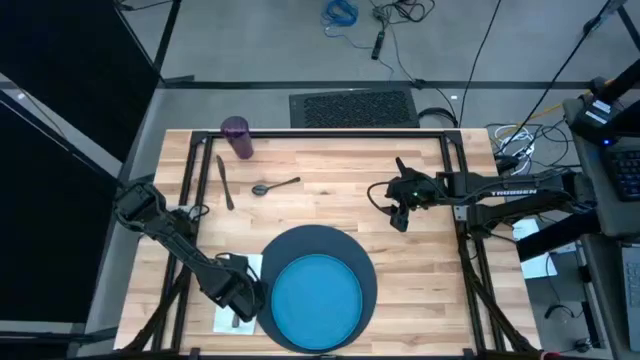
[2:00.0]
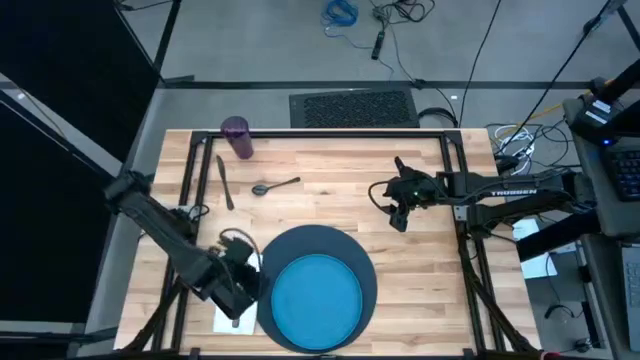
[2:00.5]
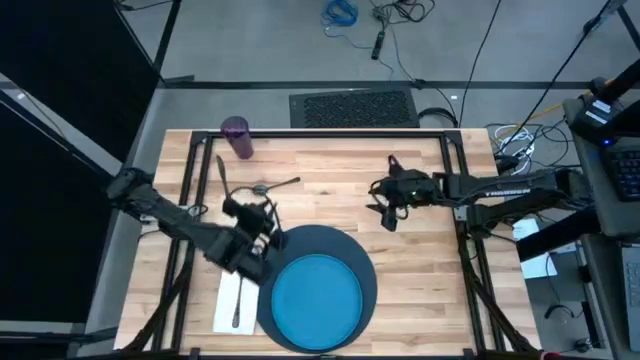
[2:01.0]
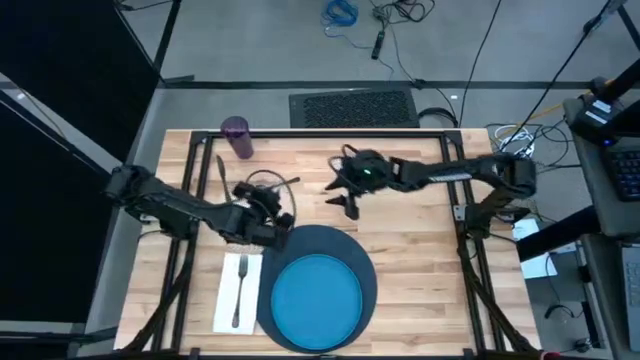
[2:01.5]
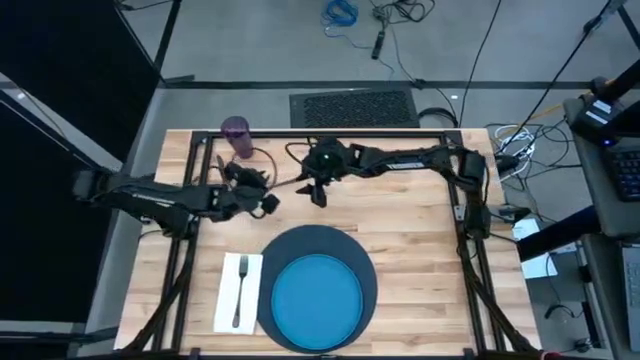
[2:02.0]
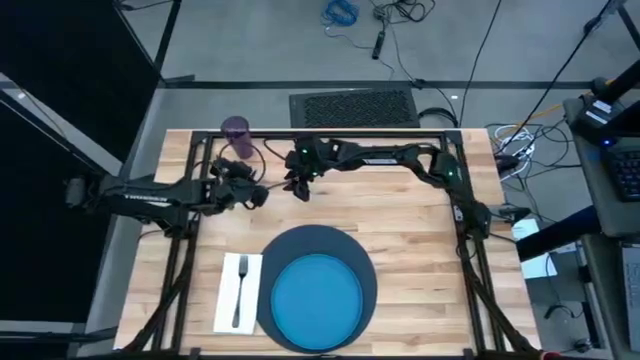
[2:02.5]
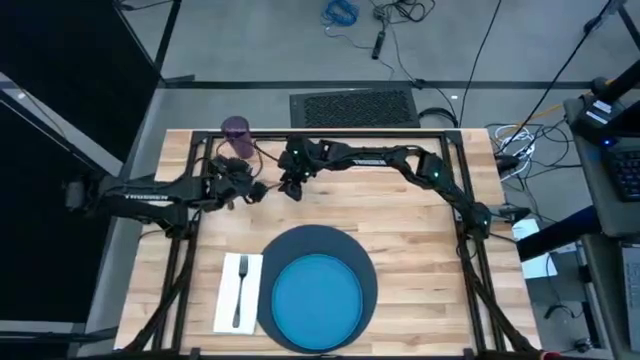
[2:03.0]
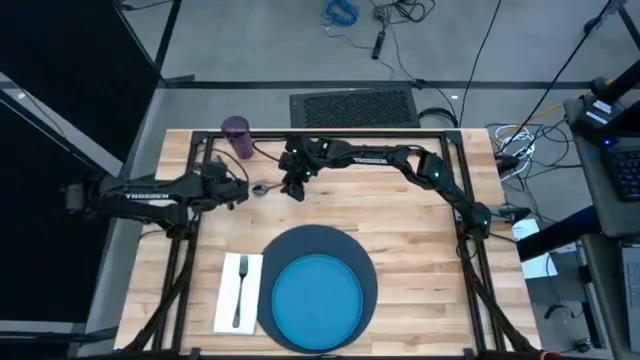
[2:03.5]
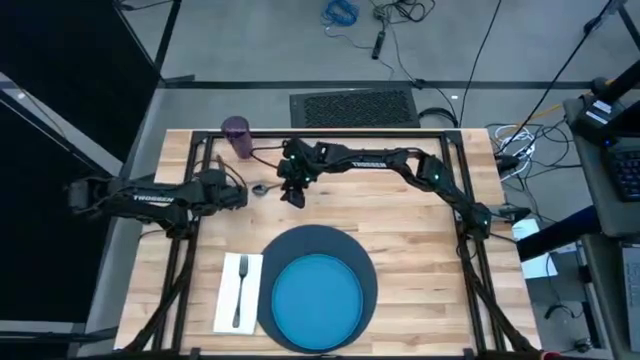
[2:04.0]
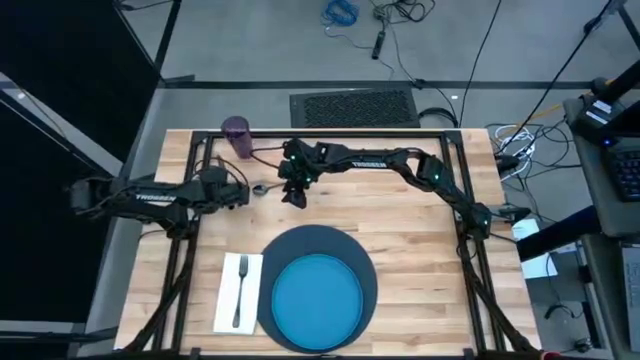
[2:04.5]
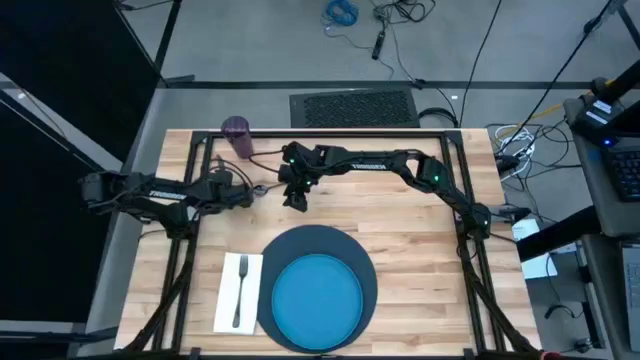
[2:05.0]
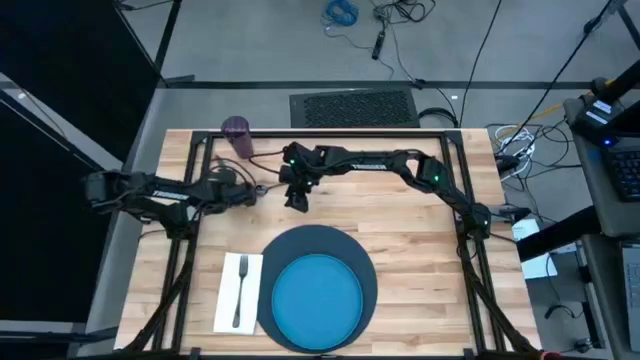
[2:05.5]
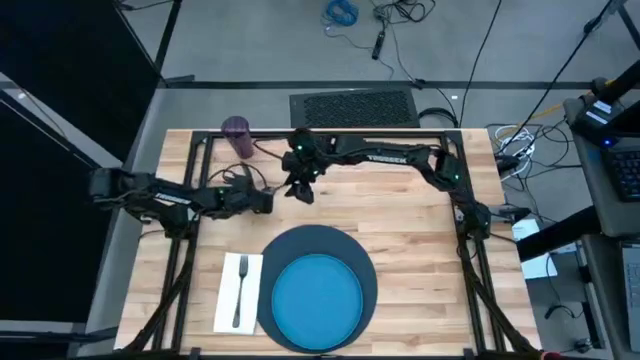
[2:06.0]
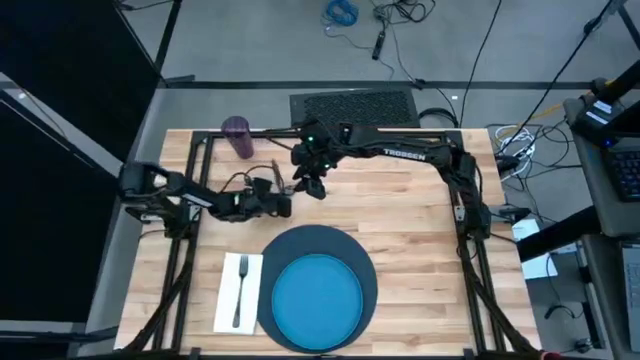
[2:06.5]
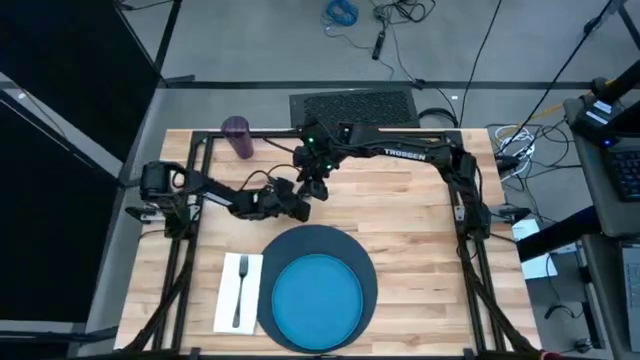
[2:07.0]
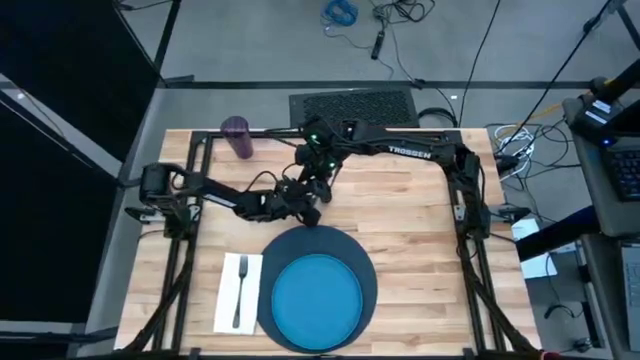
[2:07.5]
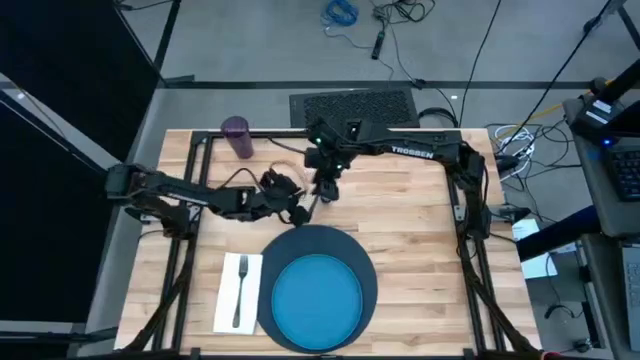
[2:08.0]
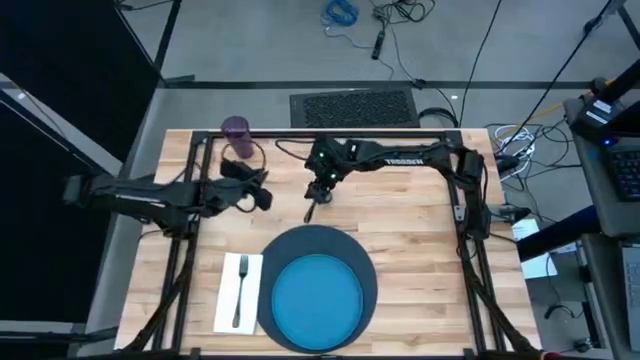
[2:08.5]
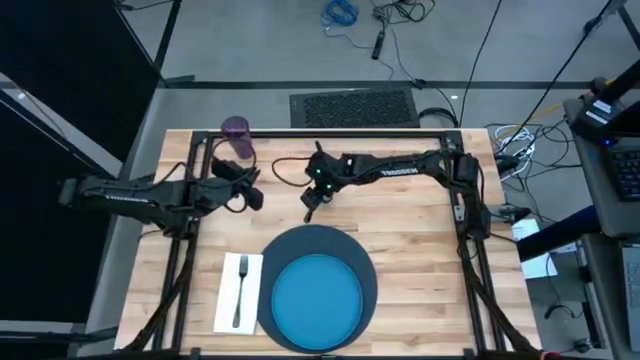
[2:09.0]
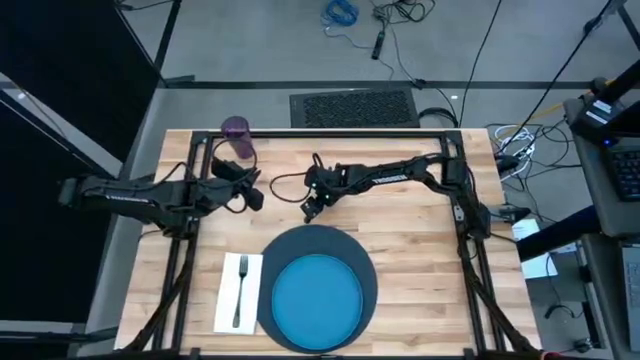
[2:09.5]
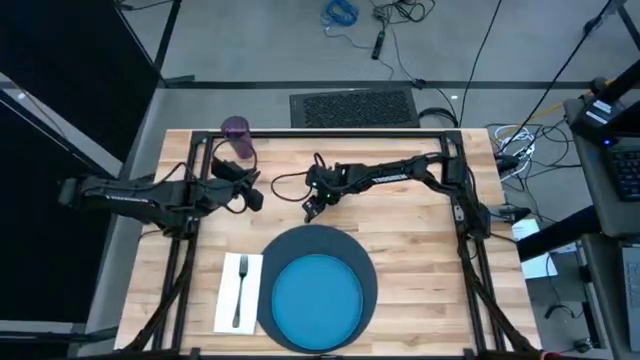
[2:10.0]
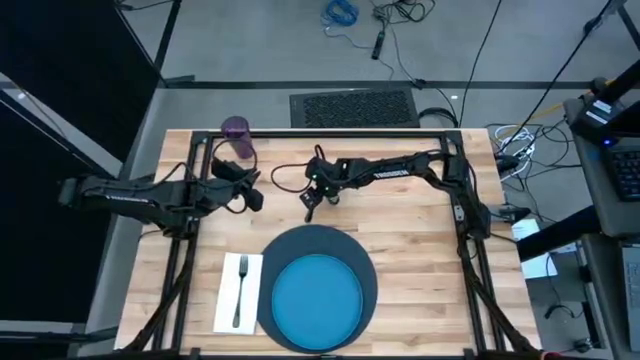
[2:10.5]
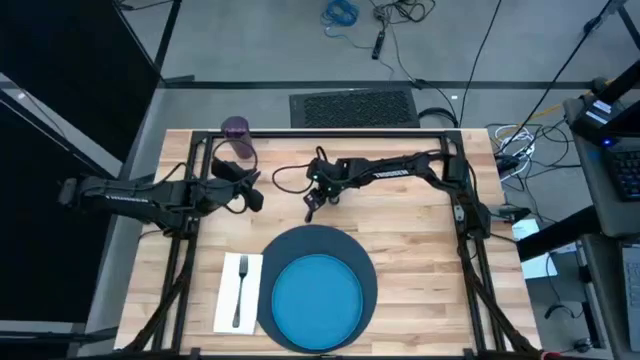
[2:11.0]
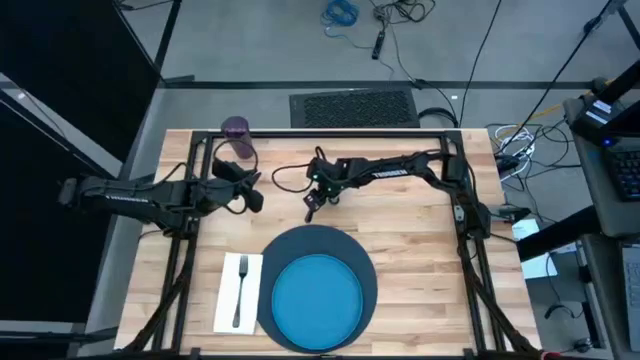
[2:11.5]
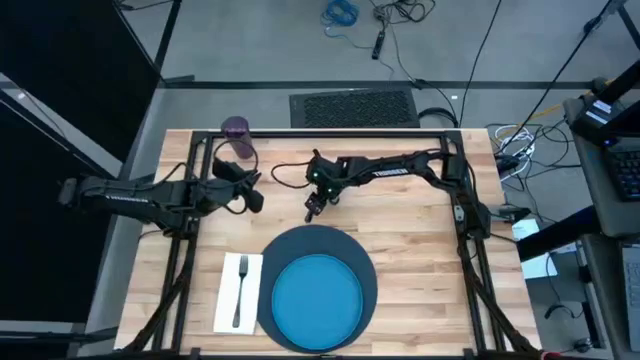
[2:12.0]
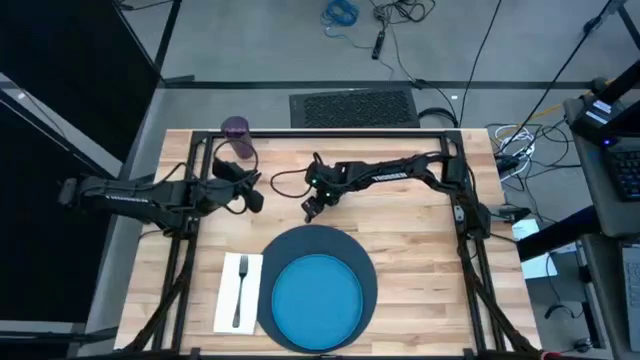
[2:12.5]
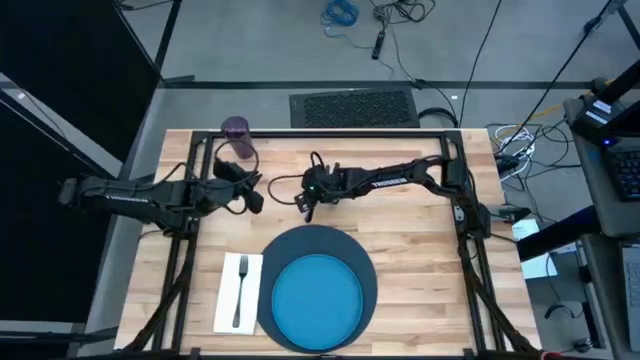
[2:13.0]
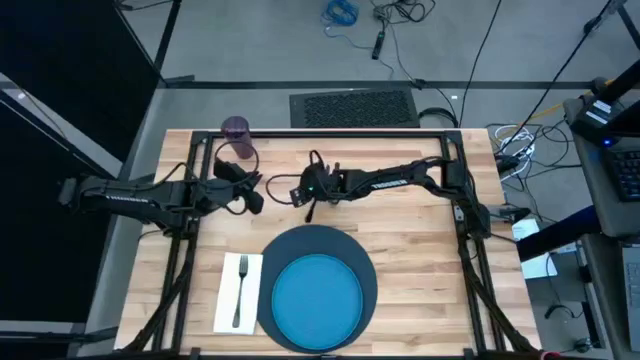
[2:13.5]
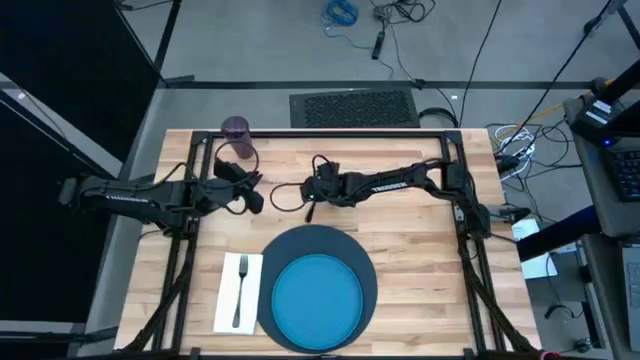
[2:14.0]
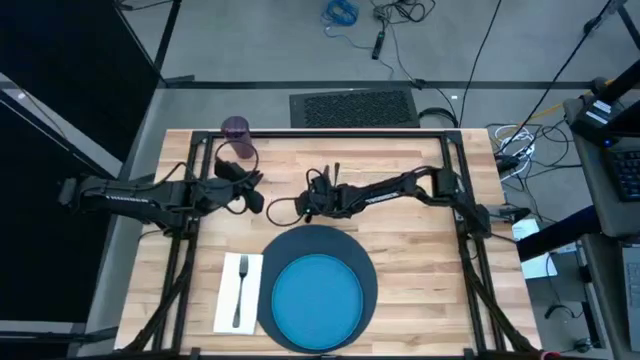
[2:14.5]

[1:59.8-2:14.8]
Task: Set table place
Move the silver knife to the middle right of the table
